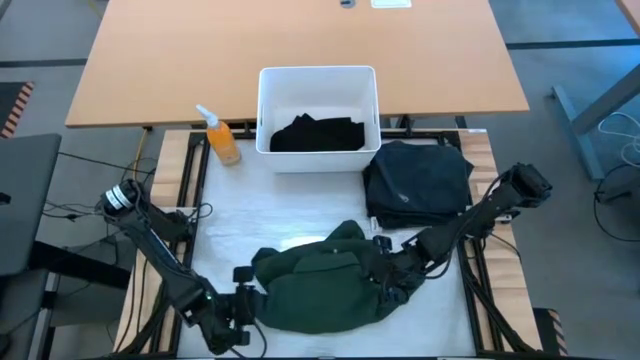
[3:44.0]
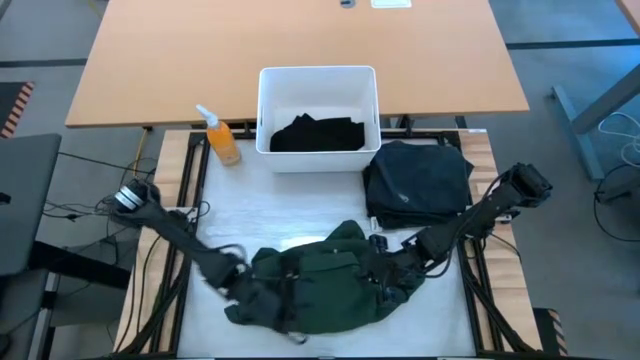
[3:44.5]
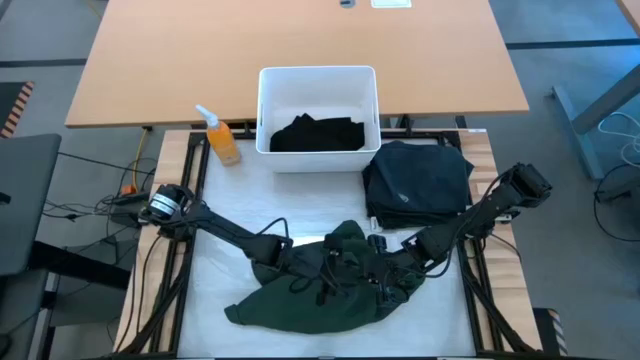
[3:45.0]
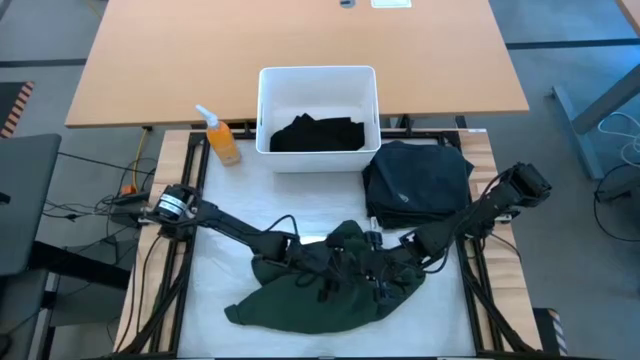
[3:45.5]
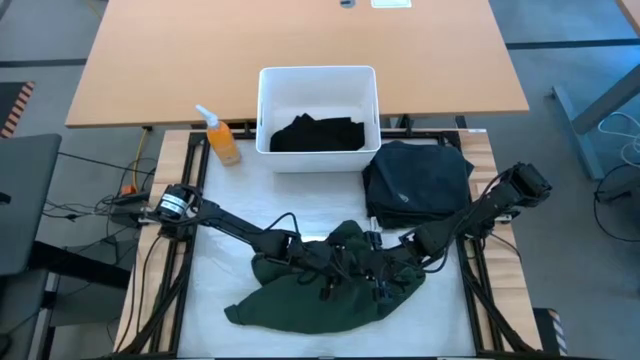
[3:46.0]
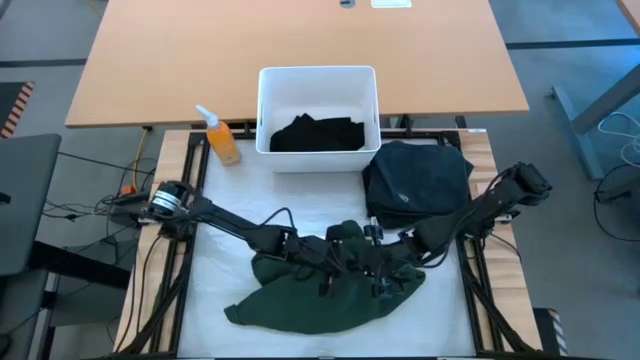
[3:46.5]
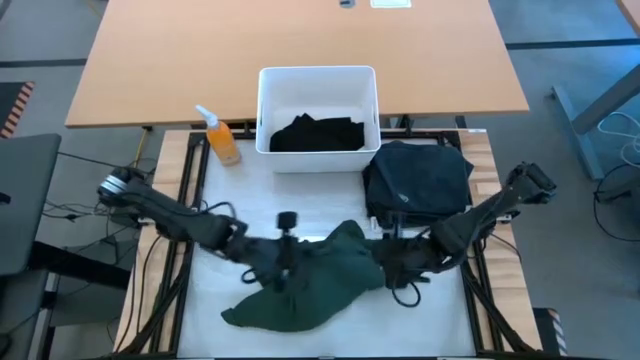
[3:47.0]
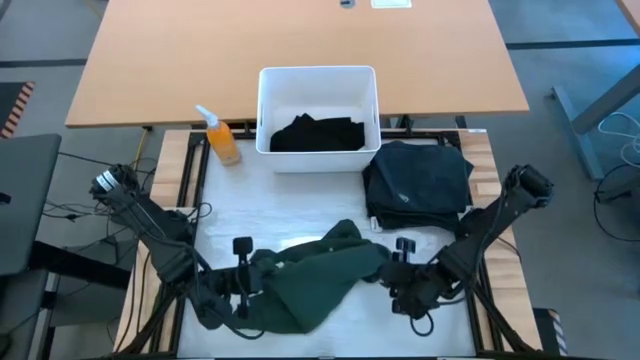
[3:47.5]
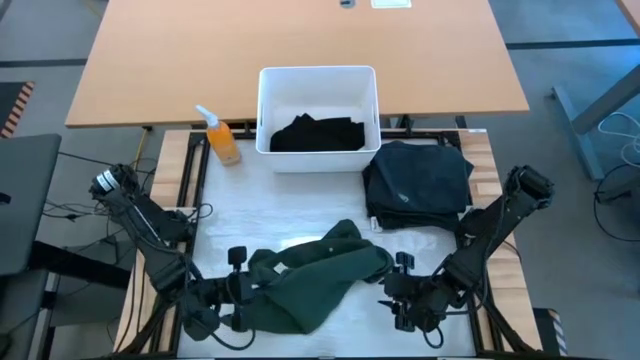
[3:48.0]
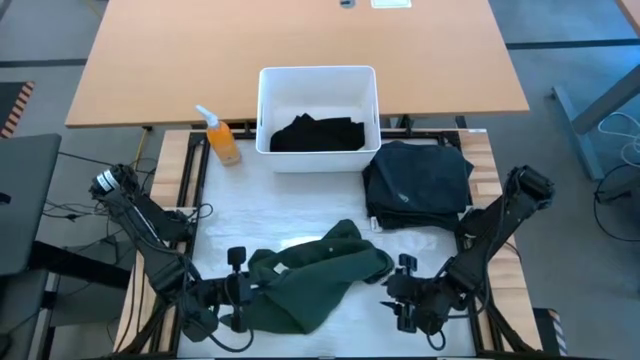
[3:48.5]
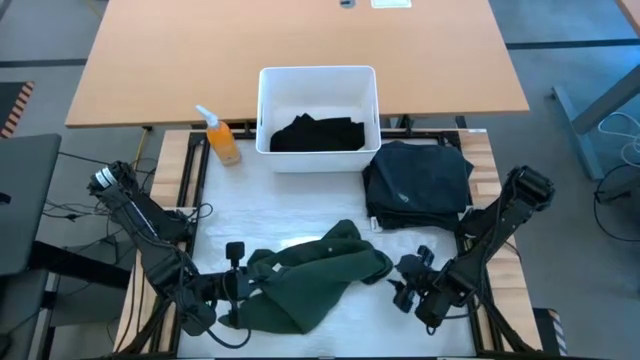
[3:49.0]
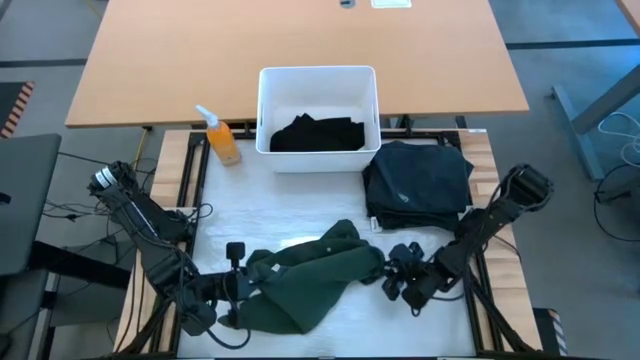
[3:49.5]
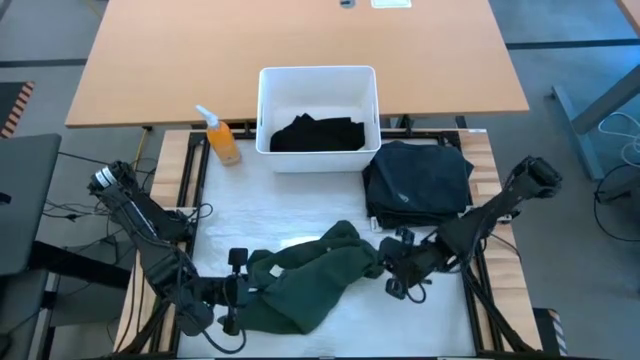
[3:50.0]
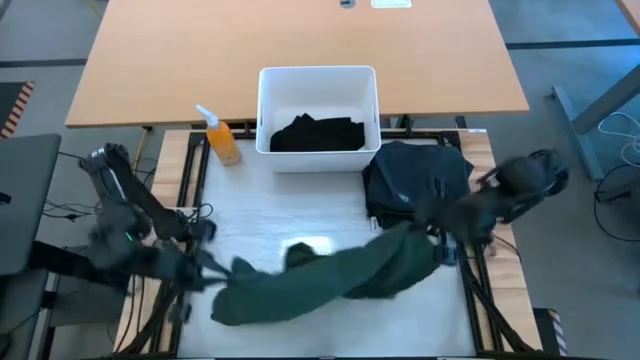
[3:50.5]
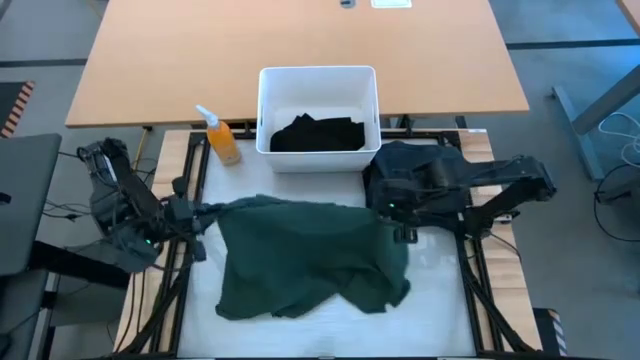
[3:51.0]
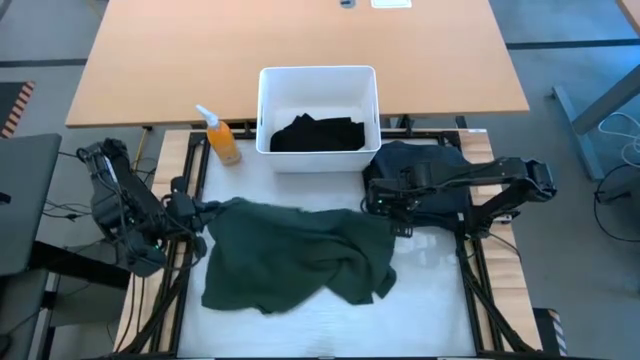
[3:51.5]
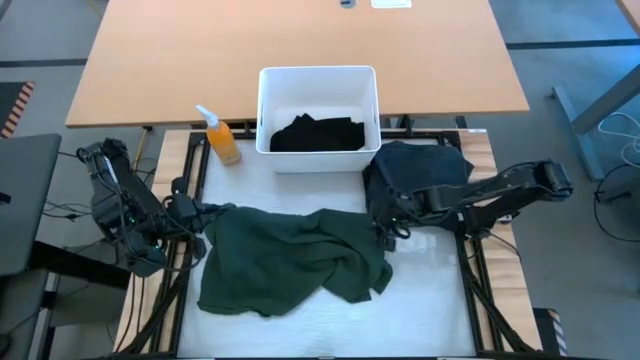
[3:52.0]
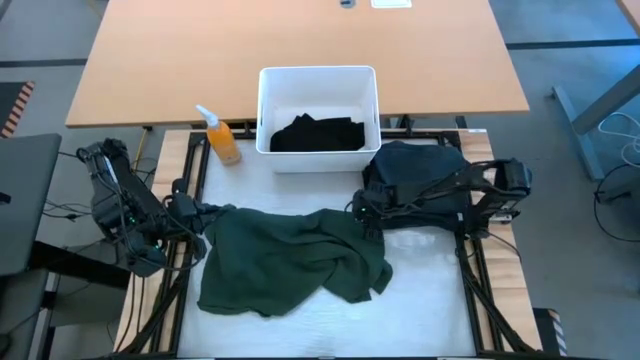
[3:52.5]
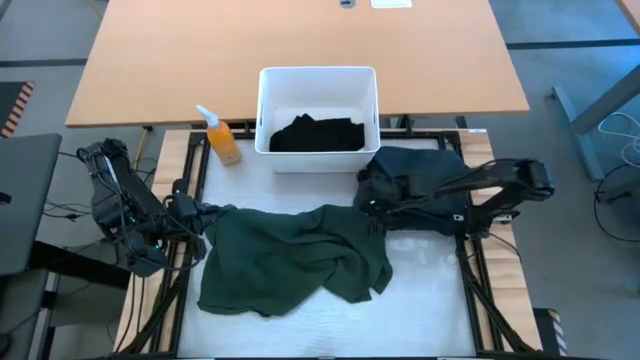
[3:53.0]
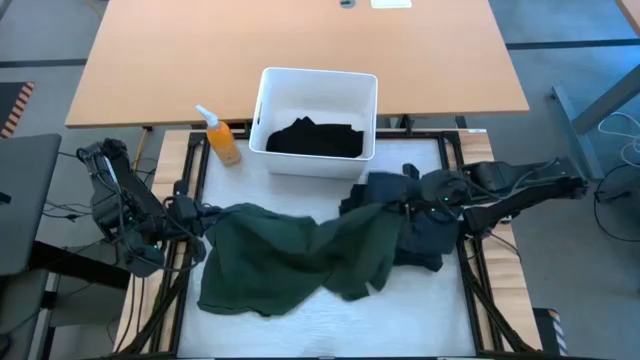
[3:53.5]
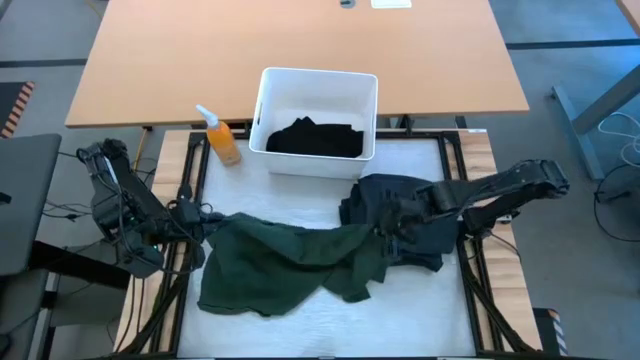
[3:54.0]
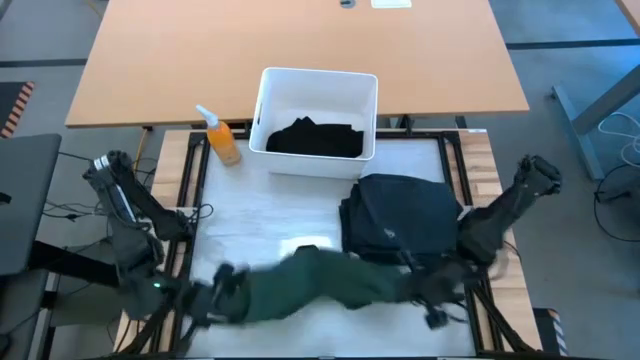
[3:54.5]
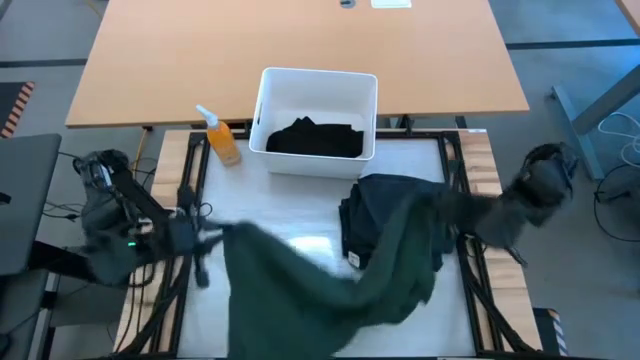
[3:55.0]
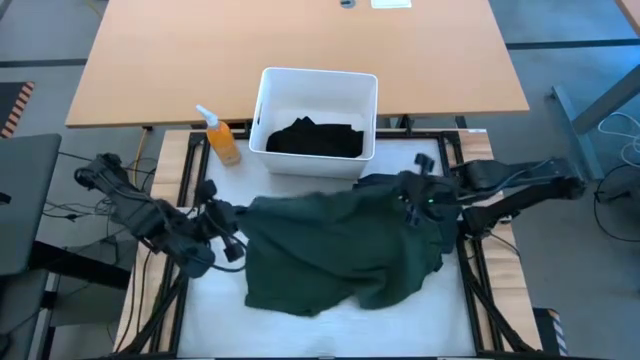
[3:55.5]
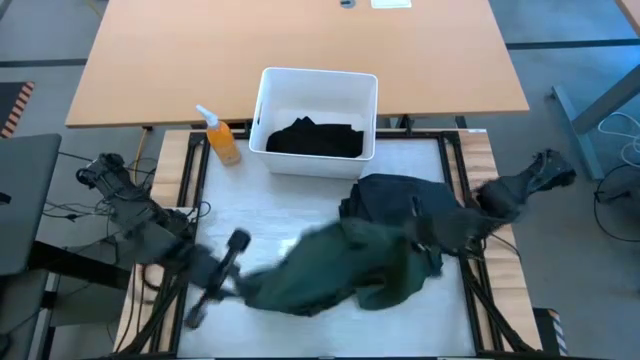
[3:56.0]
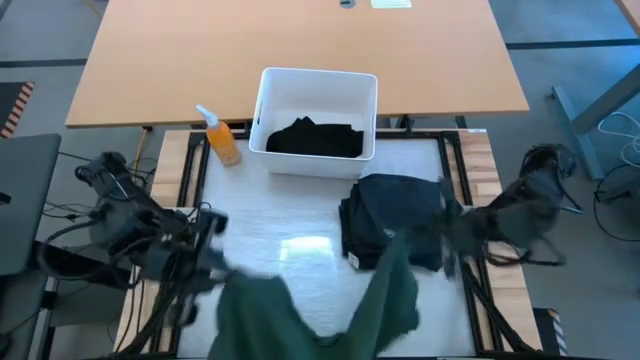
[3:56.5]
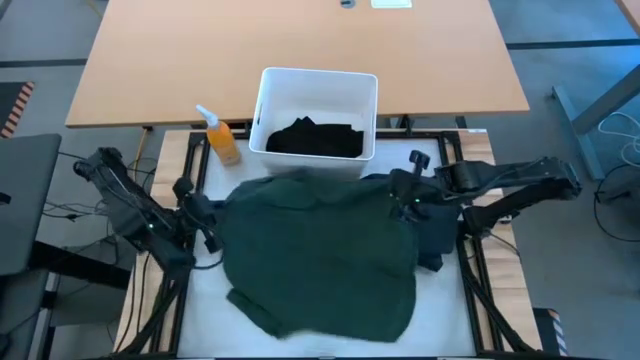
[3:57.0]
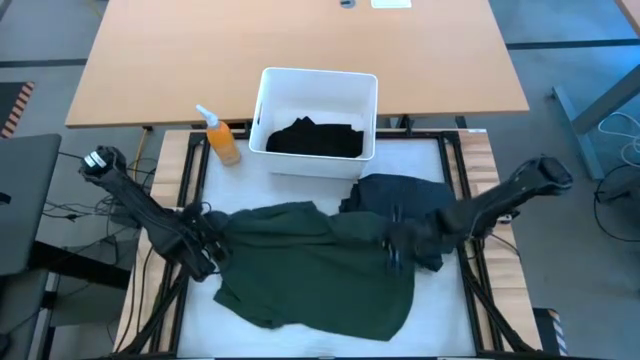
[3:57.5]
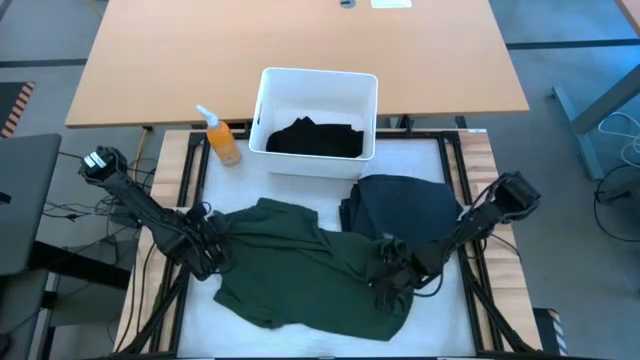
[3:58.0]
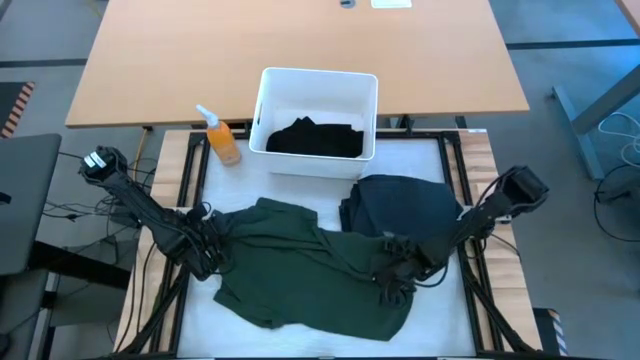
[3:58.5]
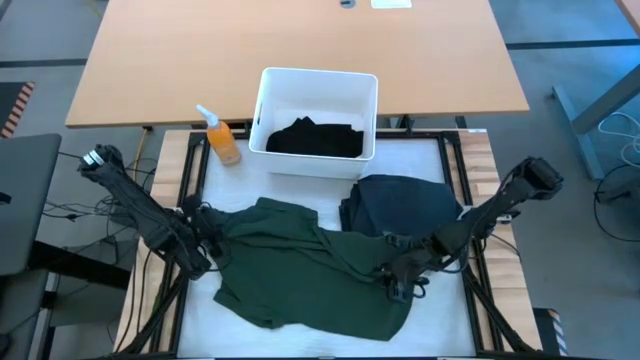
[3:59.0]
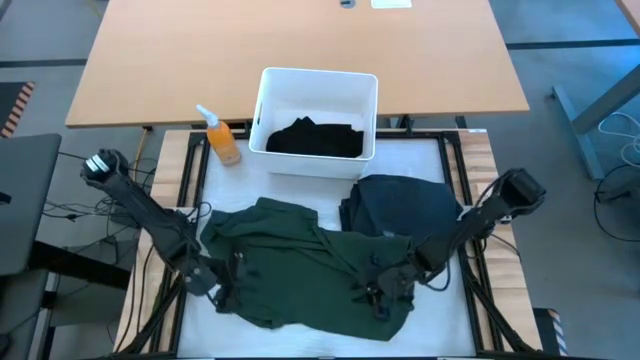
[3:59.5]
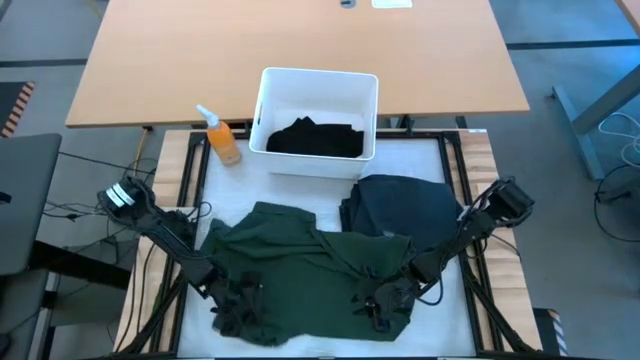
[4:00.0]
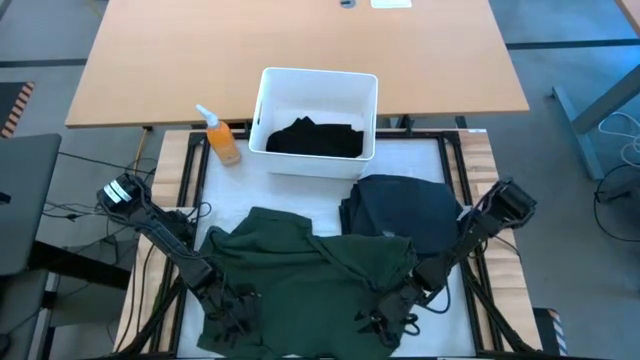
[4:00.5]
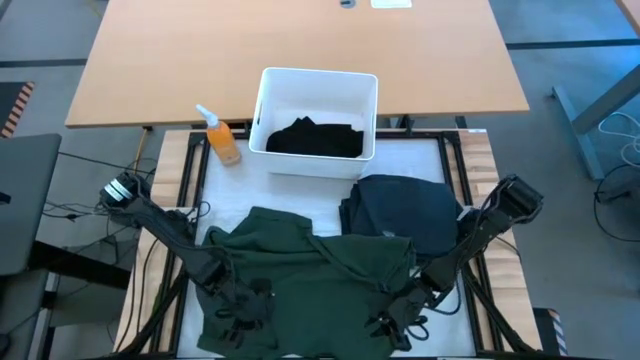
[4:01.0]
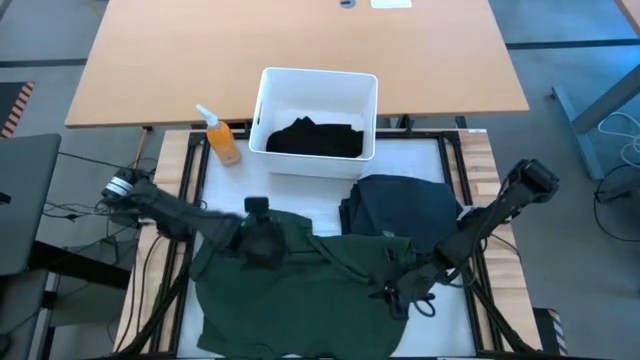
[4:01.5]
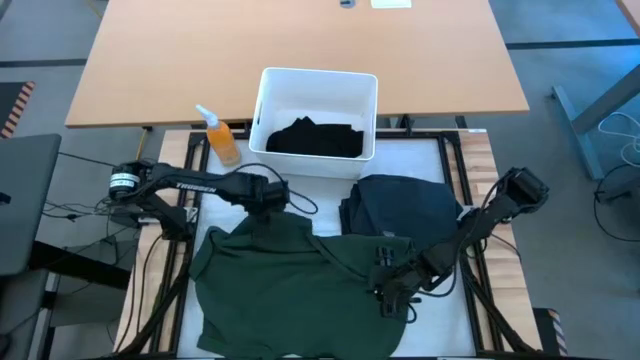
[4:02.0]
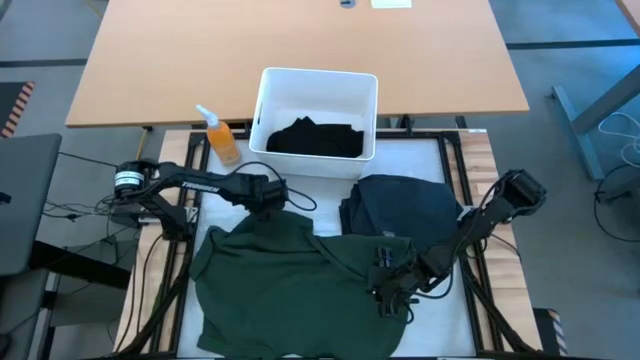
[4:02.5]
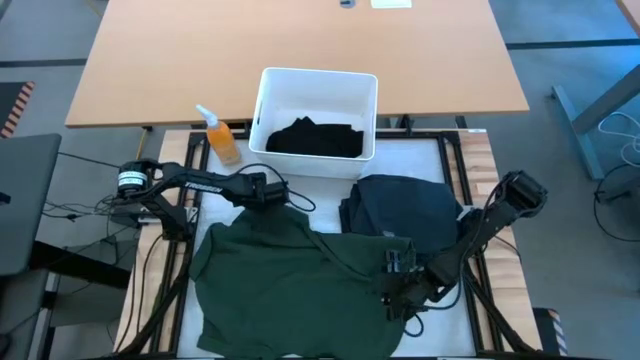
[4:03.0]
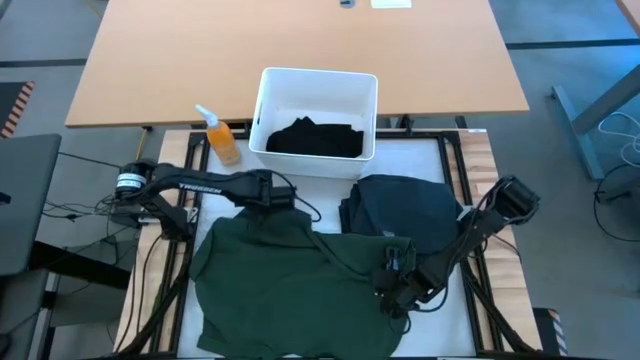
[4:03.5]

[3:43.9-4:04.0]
Task: Fold laundry
Fold the green polo shirt from the white laundry organizer

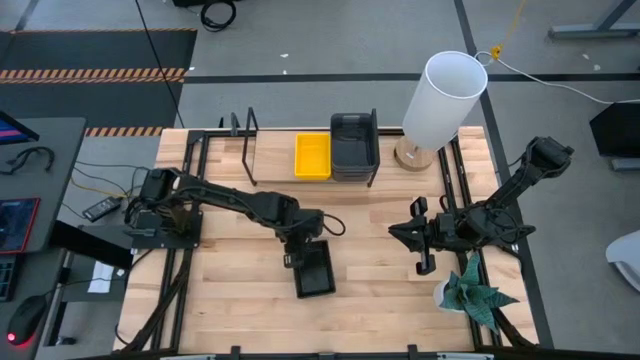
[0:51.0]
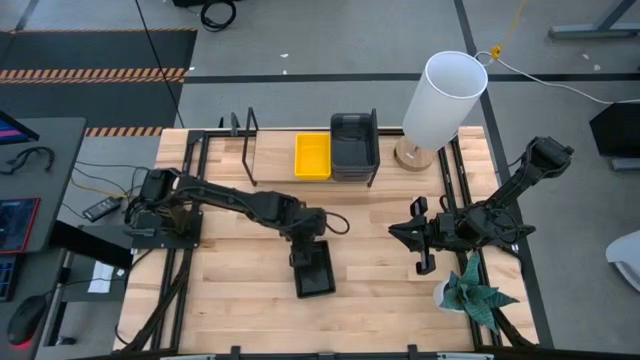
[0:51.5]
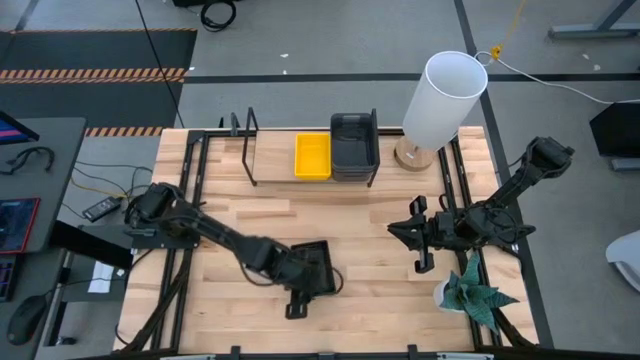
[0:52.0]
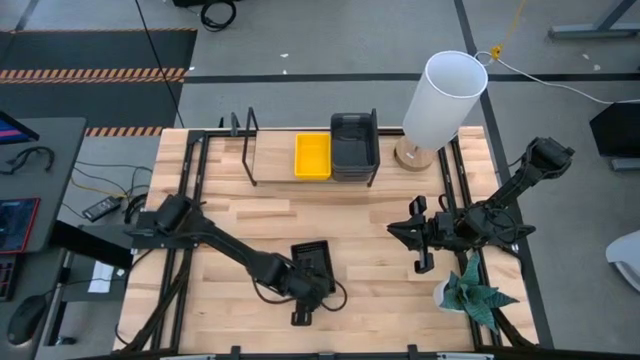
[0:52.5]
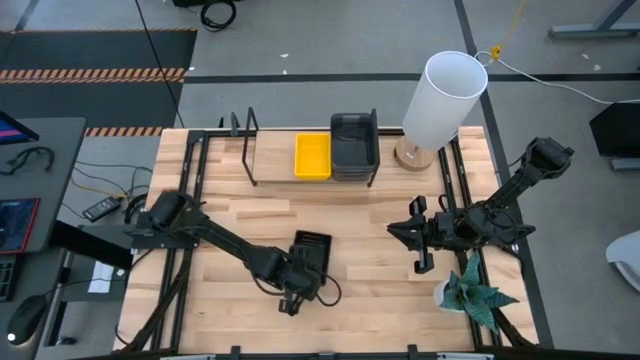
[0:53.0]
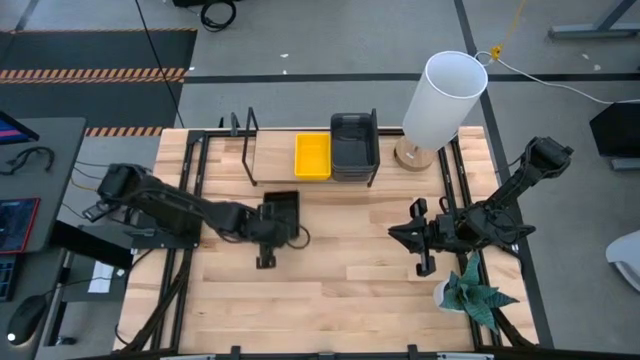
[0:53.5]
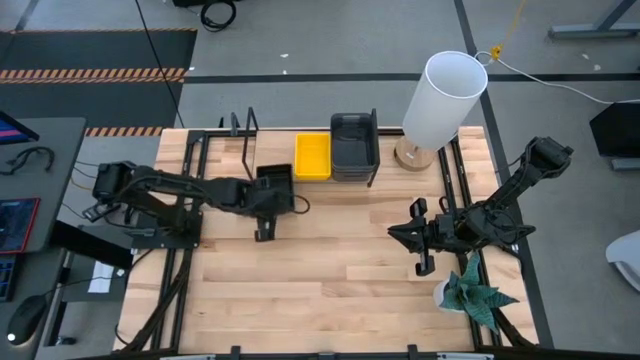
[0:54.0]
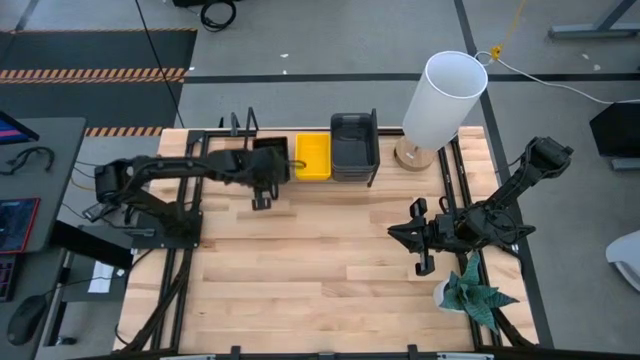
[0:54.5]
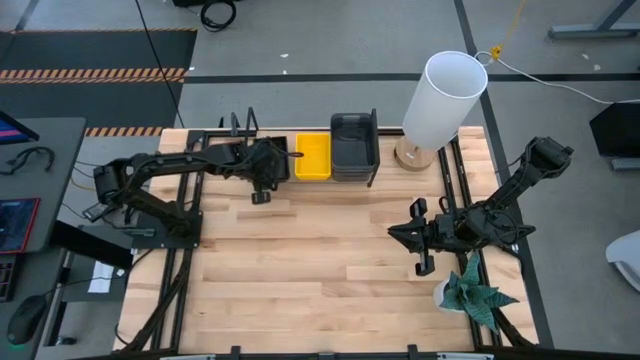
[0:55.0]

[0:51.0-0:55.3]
Task: Stack baskets on shelf by color
Put the stacked black bins on the shelf
